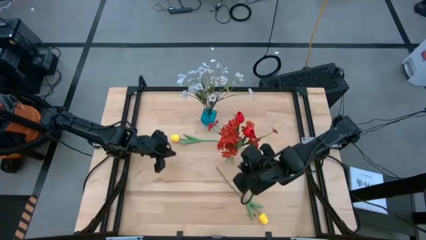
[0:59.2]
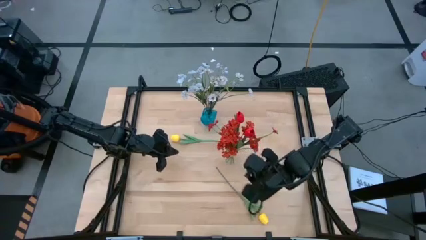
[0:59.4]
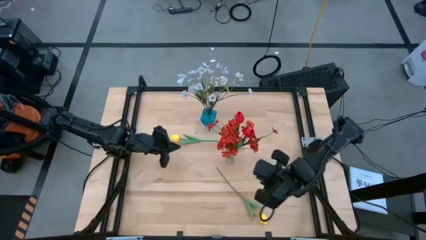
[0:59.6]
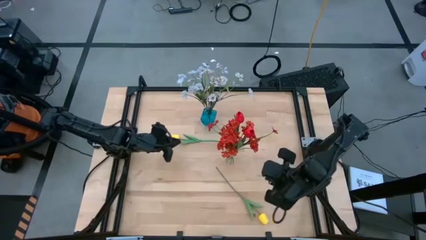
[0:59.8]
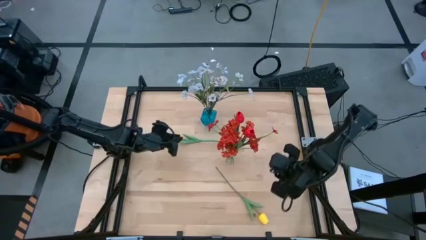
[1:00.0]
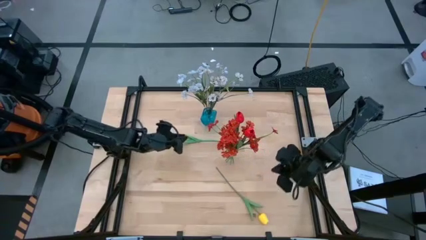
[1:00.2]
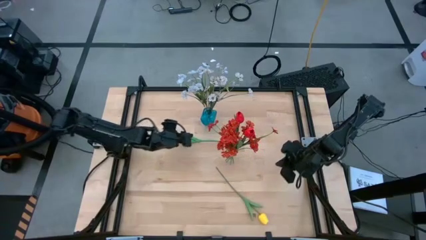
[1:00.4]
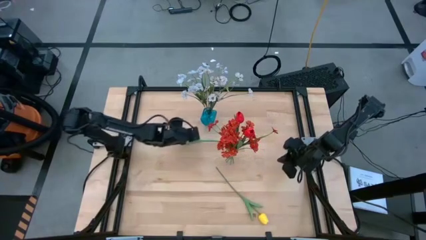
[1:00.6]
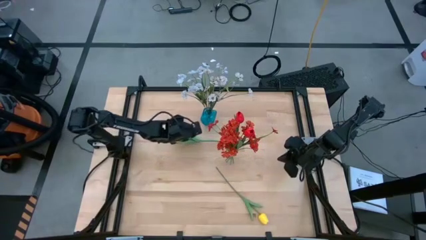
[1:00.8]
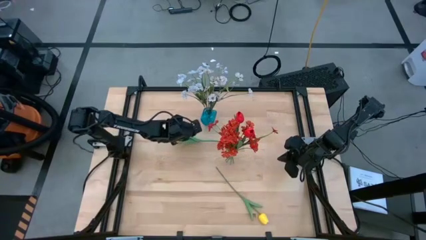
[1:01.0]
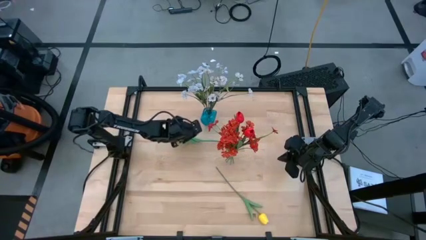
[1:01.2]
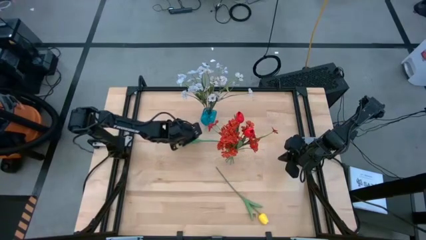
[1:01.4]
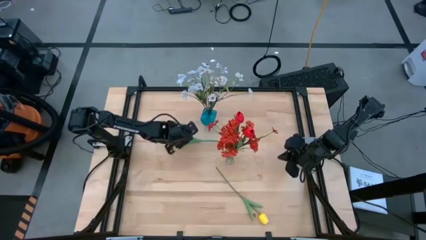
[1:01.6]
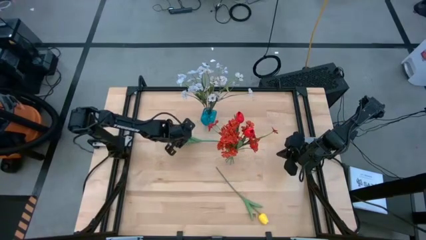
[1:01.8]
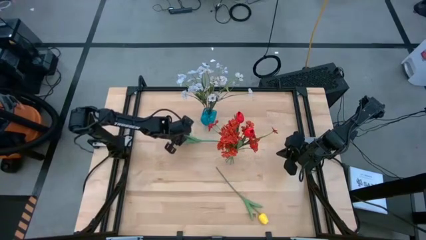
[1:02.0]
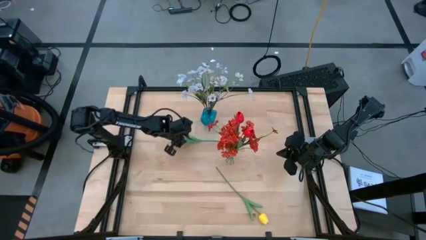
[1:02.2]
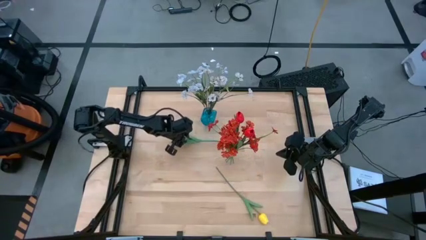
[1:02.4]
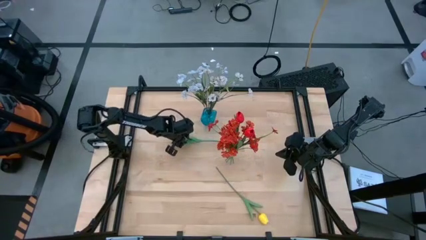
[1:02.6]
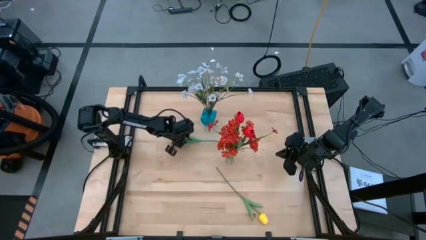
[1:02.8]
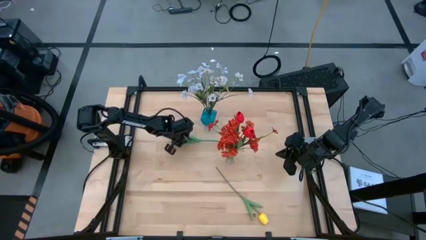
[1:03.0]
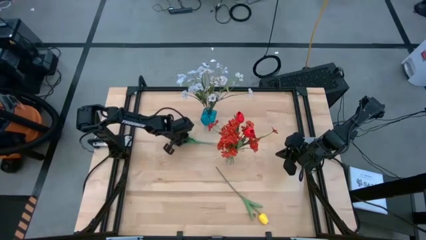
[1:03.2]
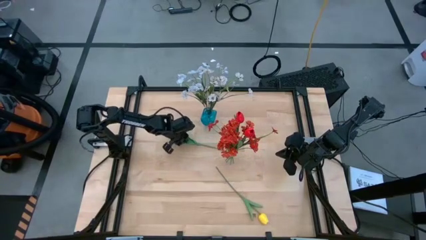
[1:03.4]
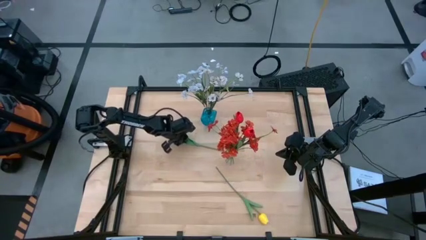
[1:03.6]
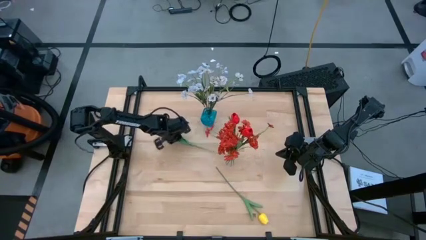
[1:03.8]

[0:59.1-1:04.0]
Task: Sort flowers into vase by color
Put the top yellow tulip into the blue vase

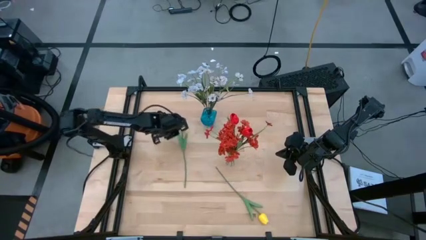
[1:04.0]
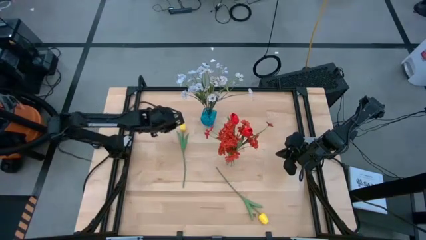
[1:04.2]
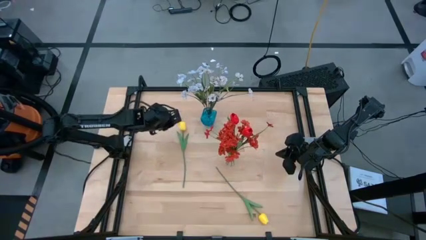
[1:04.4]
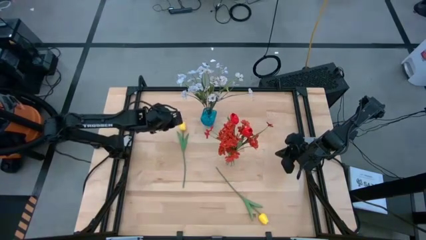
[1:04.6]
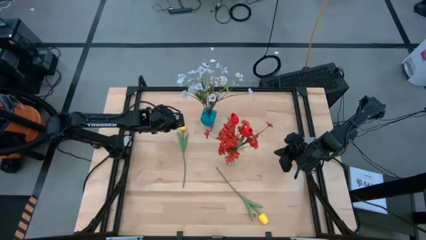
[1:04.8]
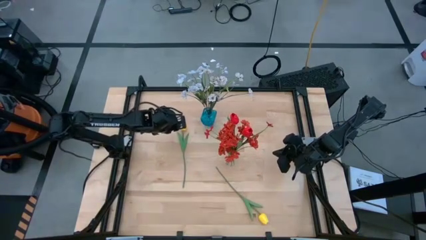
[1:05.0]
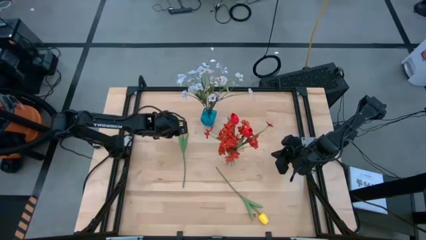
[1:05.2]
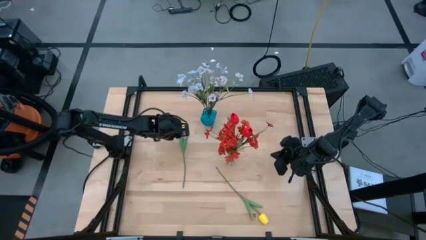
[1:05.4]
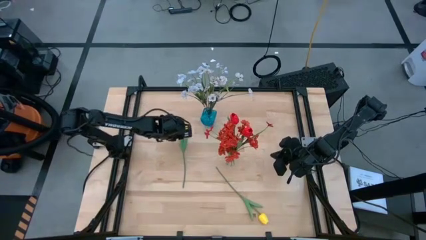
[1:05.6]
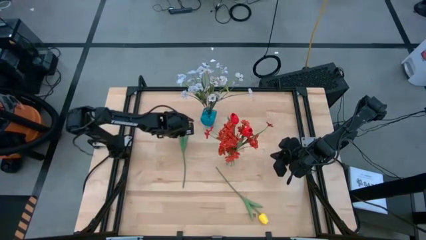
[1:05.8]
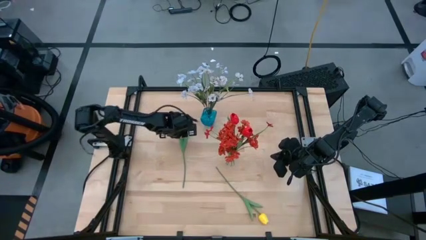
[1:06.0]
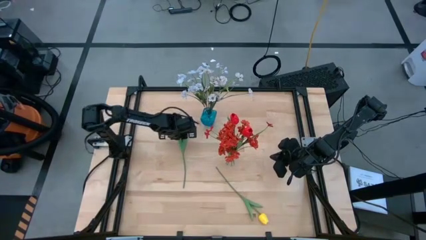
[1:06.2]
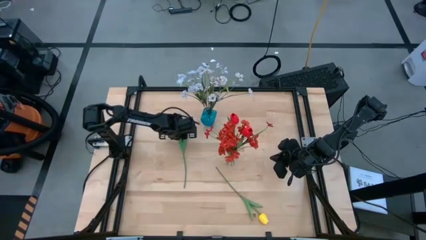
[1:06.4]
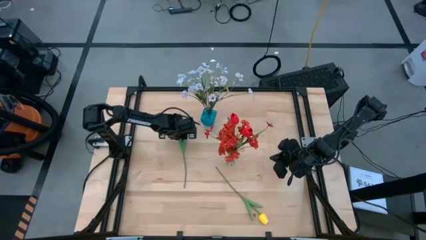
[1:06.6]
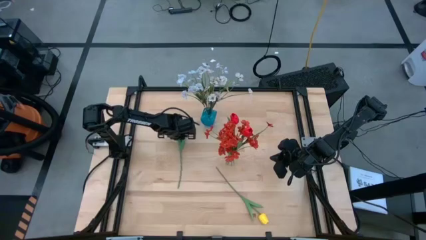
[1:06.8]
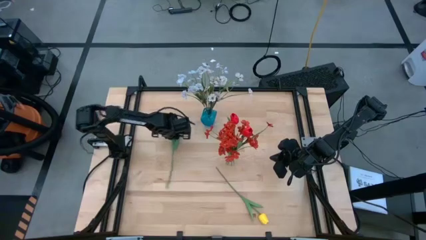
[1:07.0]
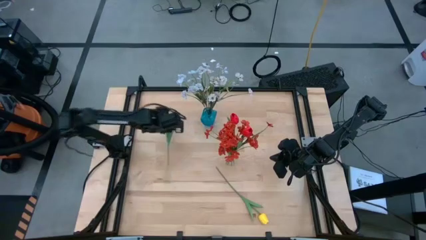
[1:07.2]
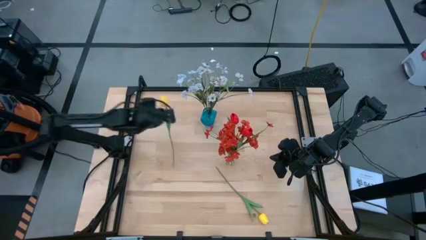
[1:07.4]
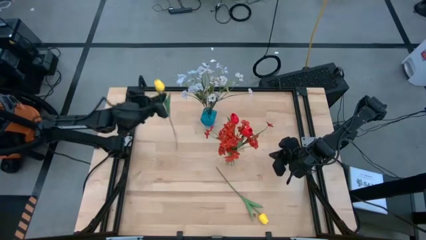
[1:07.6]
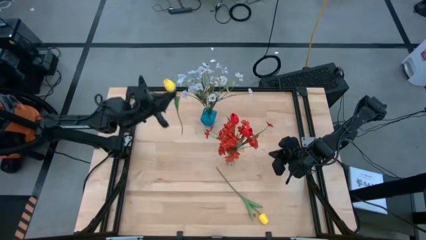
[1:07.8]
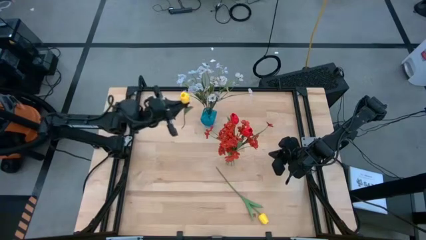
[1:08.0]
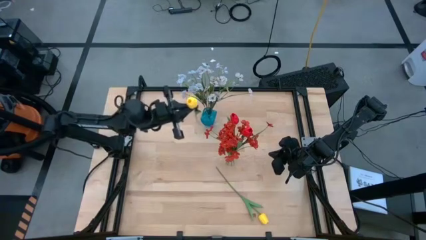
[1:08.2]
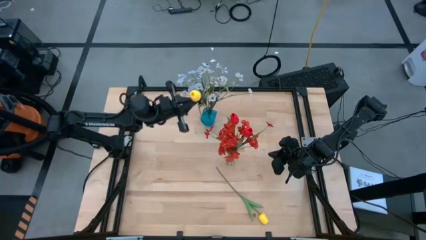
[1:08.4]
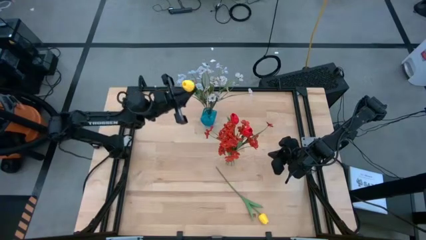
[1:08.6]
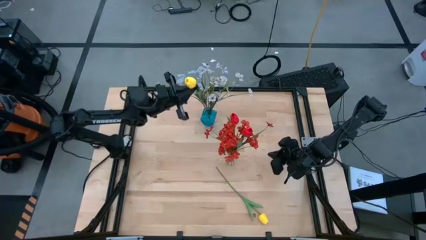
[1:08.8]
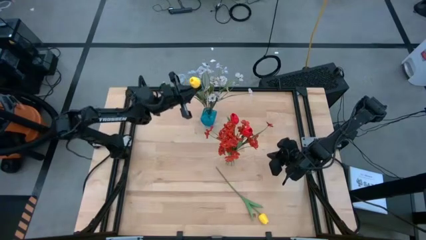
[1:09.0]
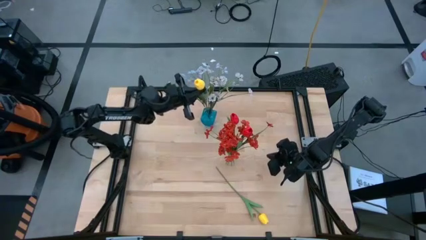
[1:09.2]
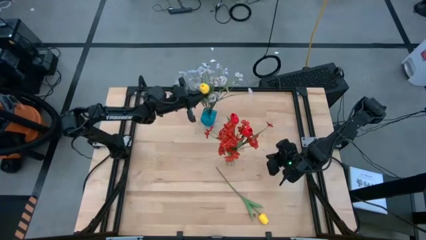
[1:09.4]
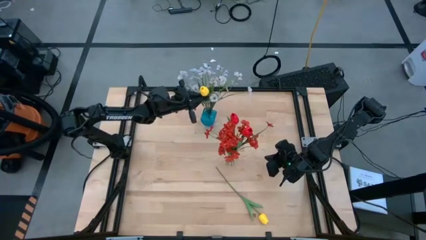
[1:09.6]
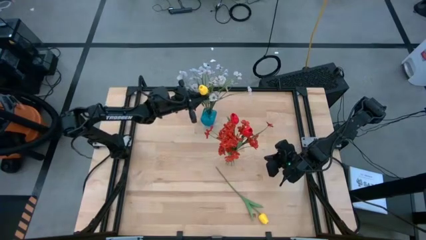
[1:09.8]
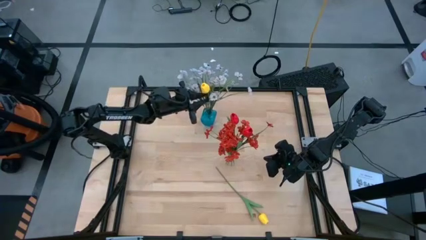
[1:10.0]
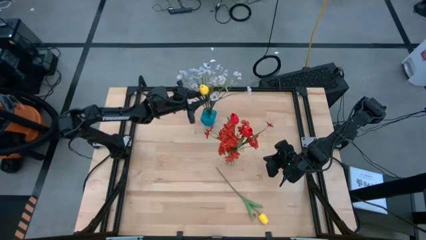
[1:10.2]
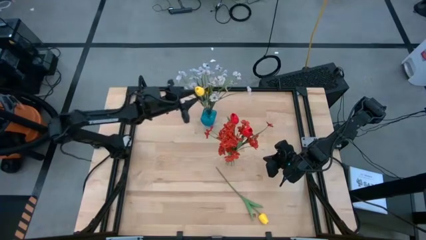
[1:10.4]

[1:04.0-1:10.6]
Put the top yellow flower into the blue vase

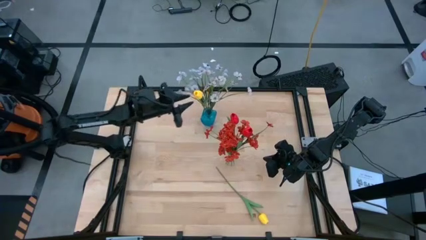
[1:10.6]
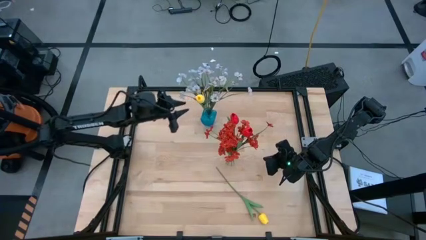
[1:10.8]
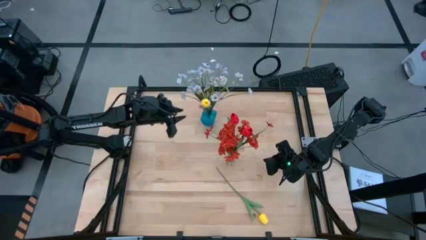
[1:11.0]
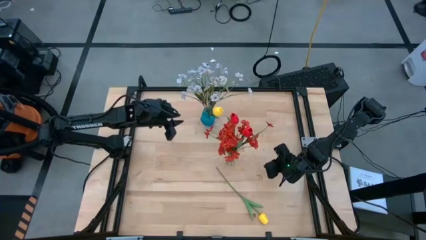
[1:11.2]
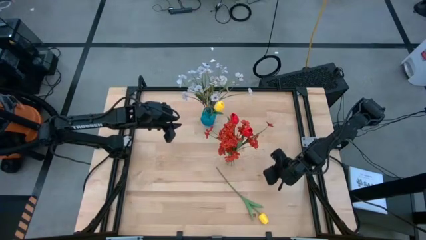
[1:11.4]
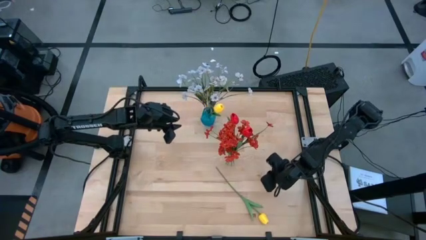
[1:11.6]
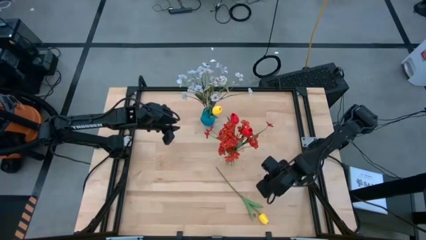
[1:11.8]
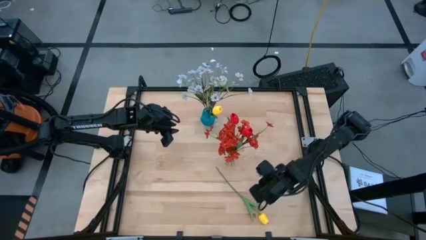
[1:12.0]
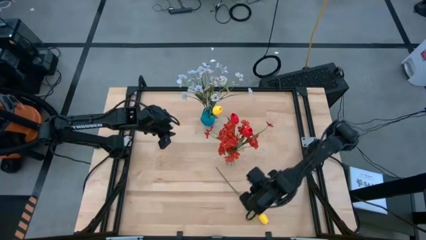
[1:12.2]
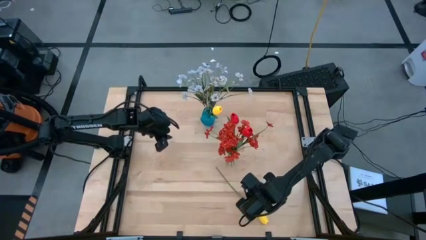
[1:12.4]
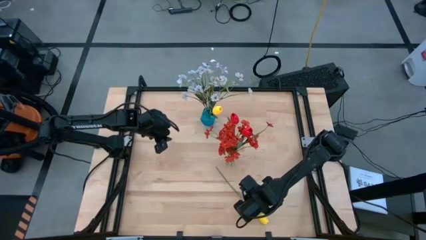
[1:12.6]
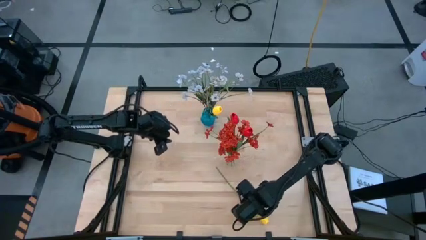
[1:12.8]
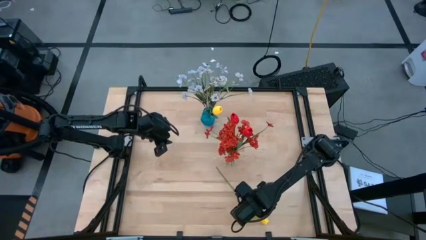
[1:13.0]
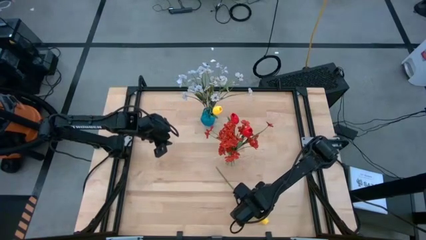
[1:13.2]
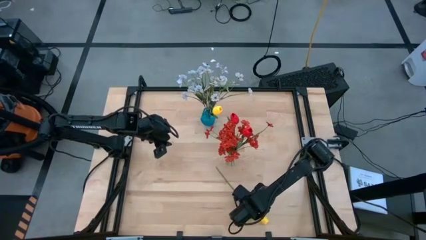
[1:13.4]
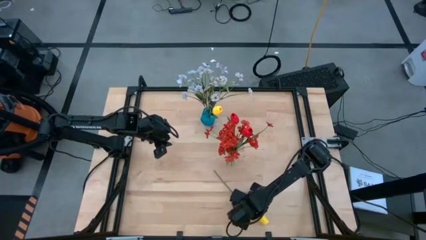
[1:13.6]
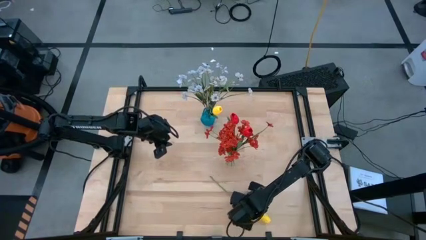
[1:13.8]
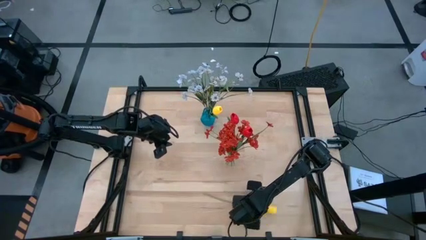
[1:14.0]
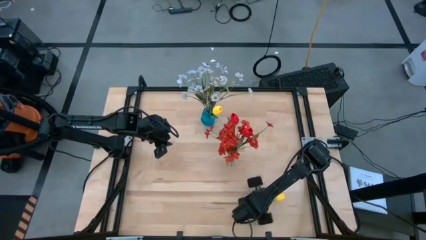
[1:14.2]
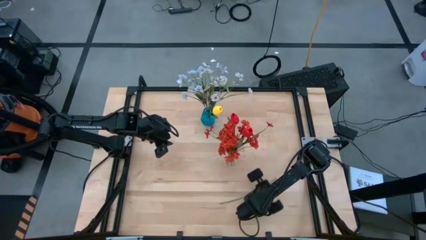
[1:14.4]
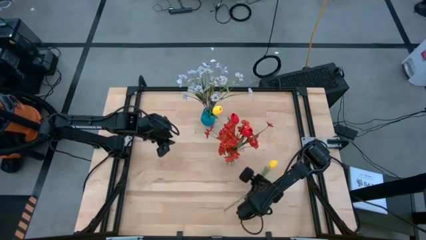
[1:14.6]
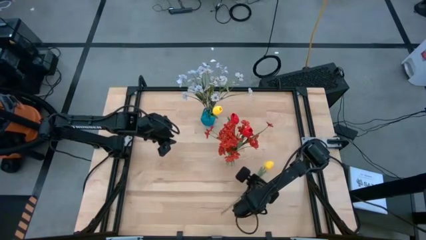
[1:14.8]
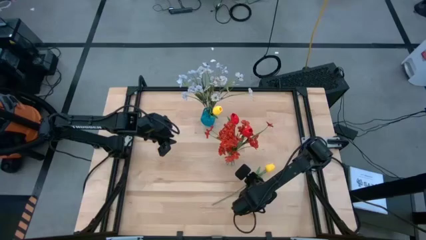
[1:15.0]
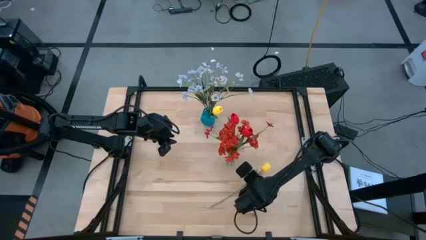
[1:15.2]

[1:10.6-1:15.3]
Put the yellow flower into the blue vase

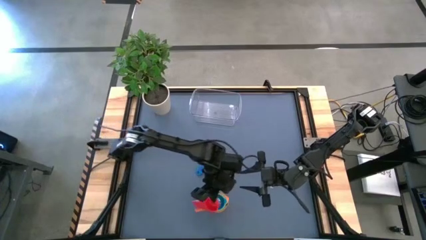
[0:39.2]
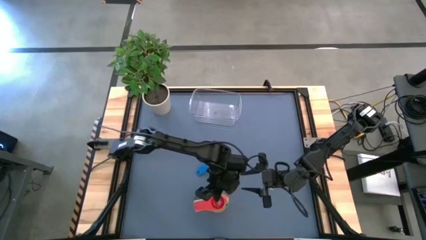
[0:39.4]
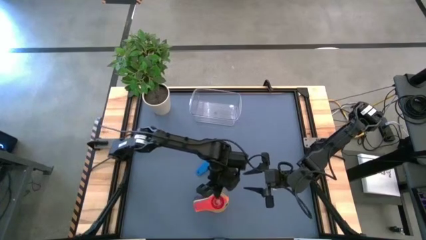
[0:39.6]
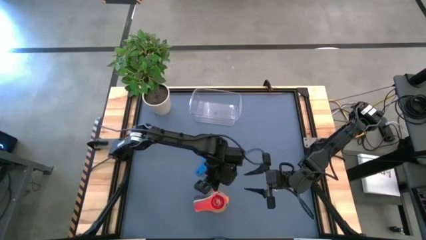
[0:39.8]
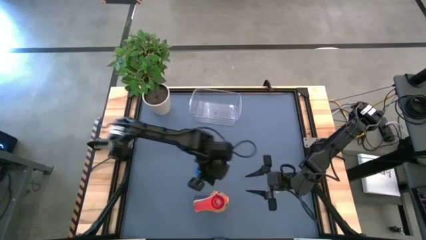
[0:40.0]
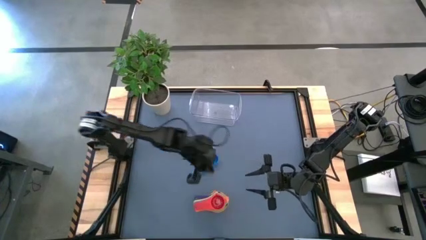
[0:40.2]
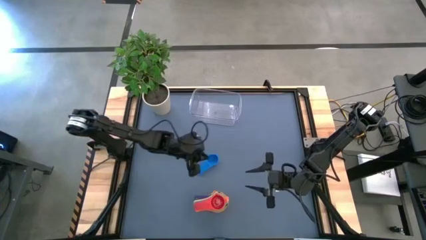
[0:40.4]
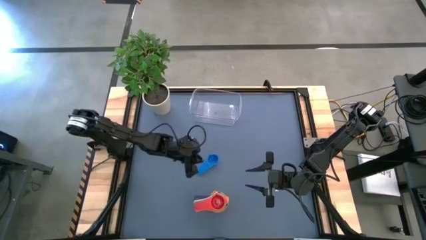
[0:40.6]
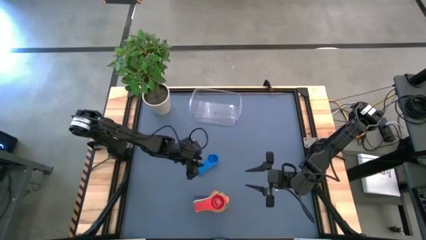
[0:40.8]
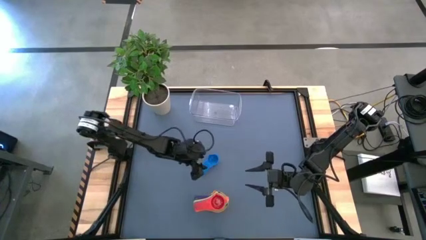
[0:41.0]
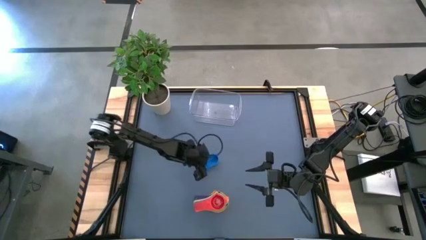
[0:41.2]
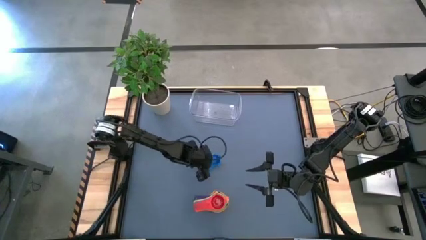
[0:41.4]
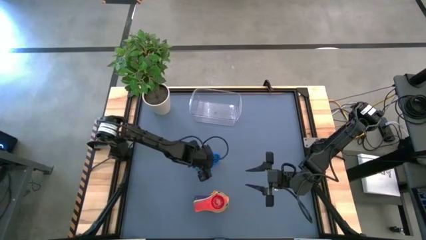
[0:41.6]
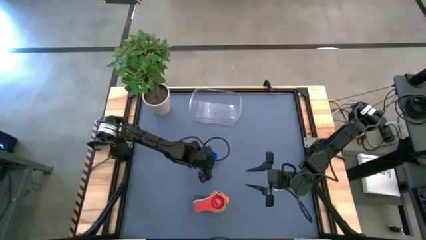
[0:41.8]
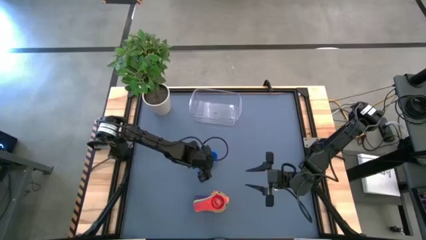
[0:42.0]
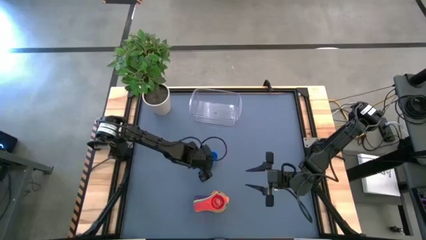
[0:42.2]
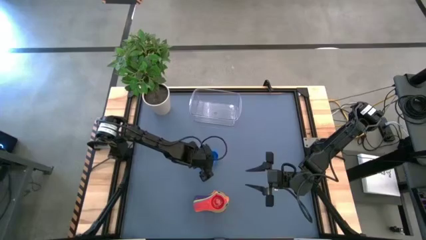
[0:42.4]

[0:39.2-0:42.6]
Task: Nest measuring cups in basket
Stack the blue measuring cup on top of the red measuring cup
